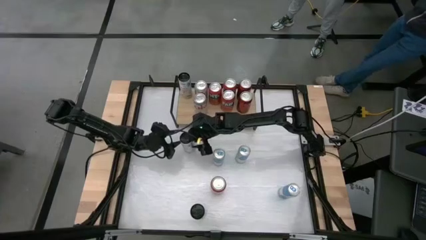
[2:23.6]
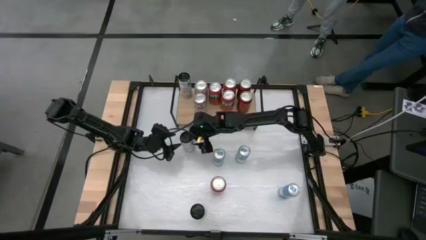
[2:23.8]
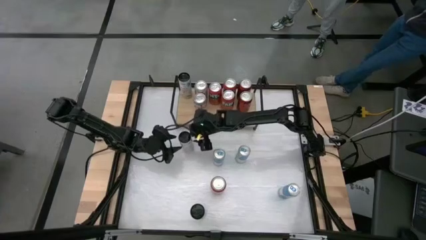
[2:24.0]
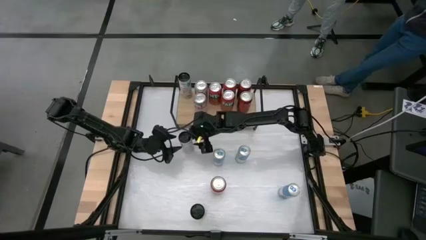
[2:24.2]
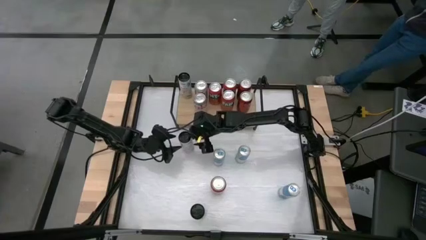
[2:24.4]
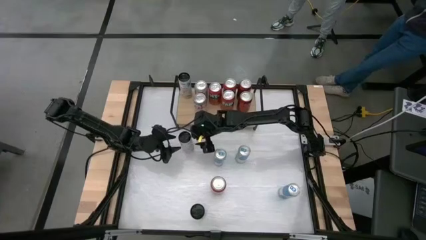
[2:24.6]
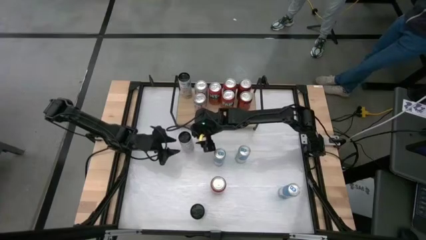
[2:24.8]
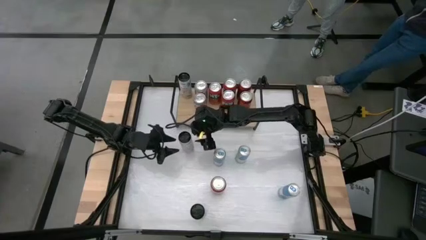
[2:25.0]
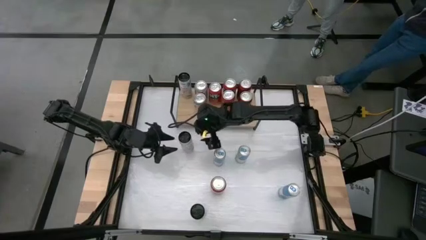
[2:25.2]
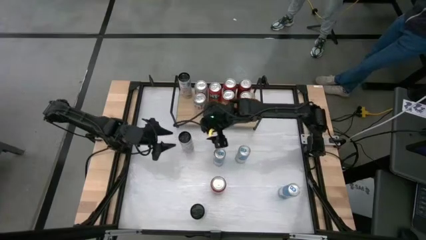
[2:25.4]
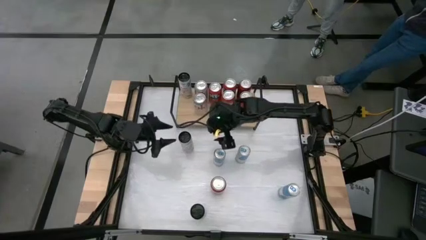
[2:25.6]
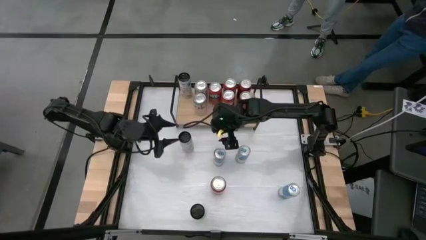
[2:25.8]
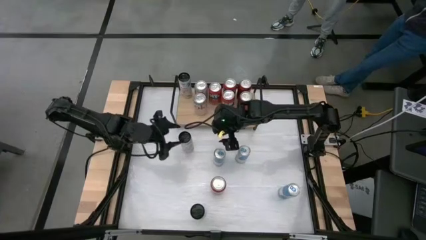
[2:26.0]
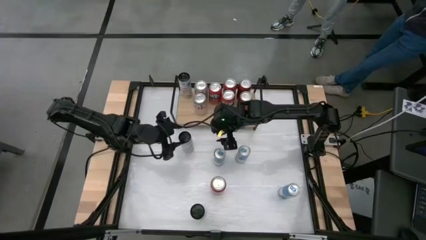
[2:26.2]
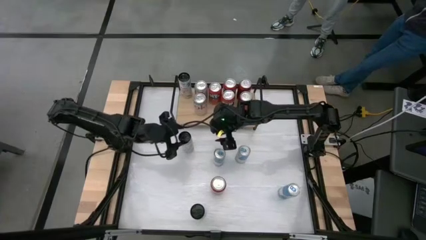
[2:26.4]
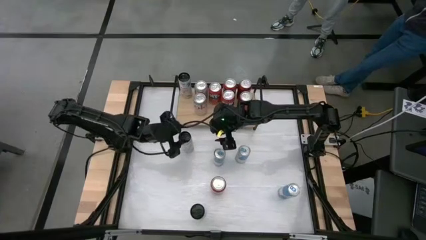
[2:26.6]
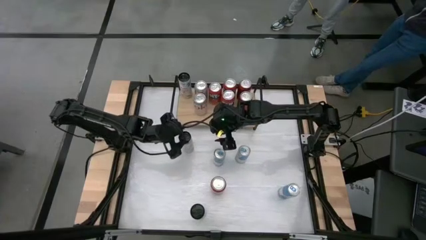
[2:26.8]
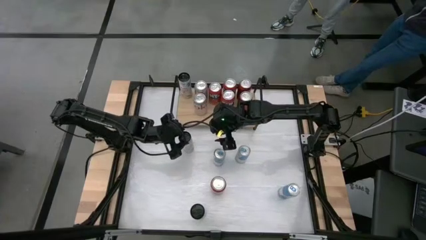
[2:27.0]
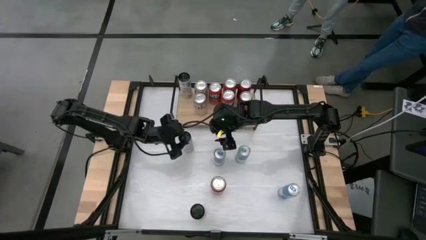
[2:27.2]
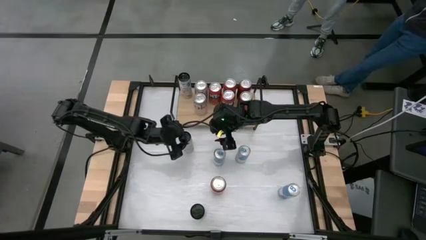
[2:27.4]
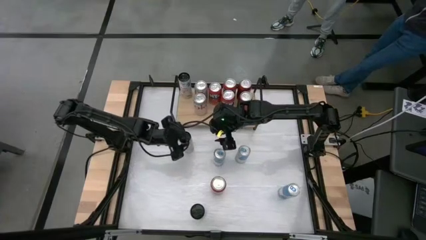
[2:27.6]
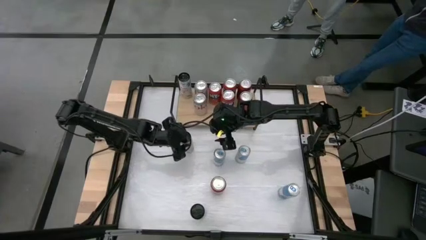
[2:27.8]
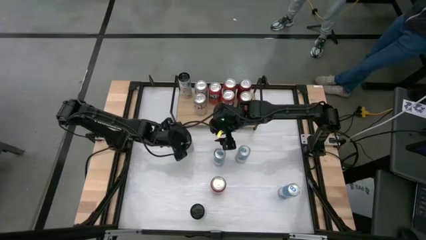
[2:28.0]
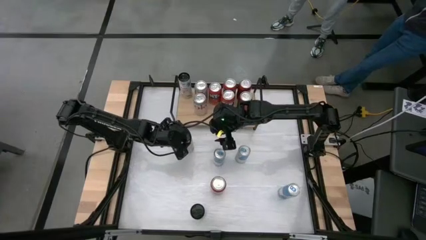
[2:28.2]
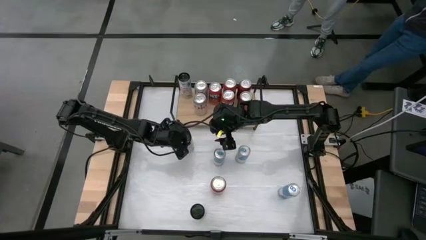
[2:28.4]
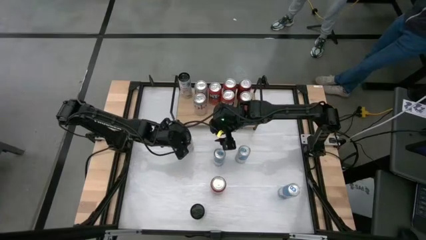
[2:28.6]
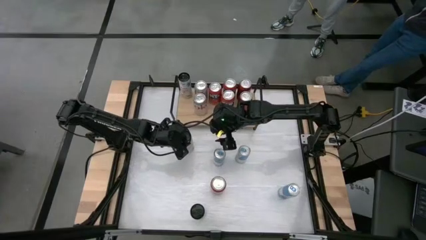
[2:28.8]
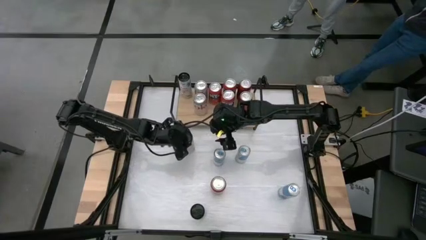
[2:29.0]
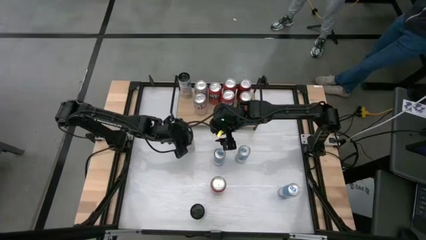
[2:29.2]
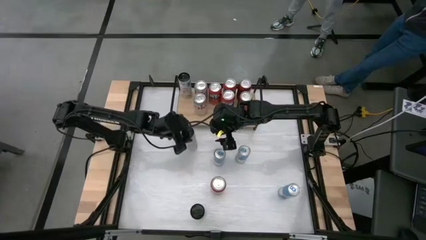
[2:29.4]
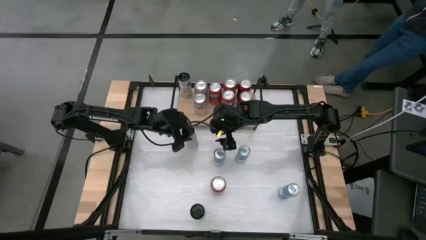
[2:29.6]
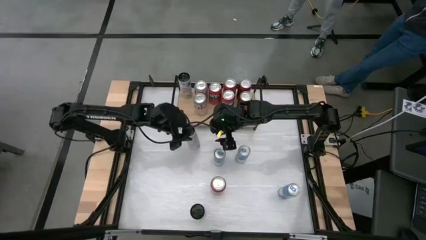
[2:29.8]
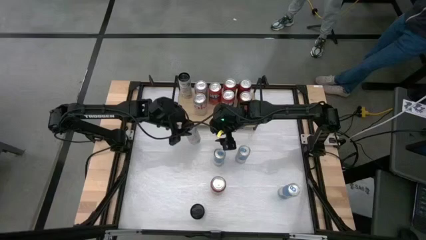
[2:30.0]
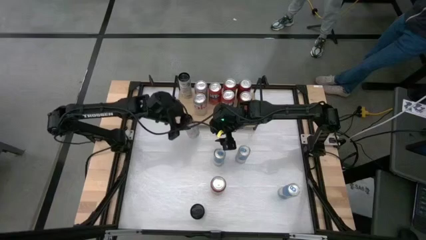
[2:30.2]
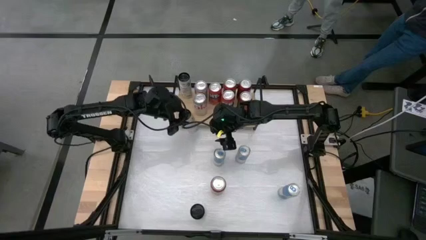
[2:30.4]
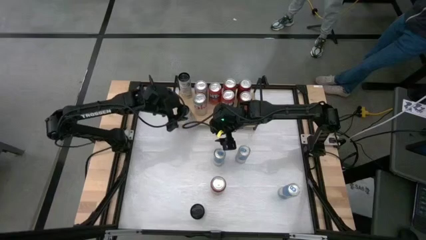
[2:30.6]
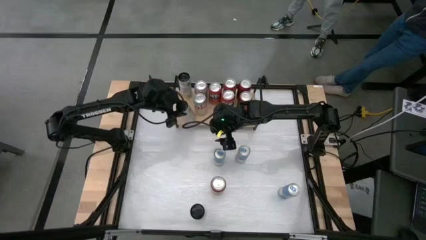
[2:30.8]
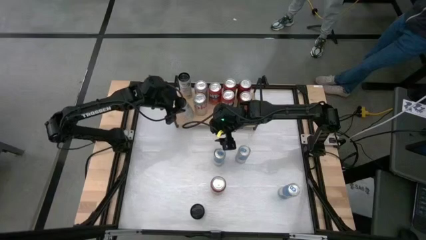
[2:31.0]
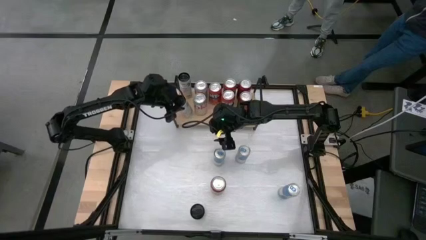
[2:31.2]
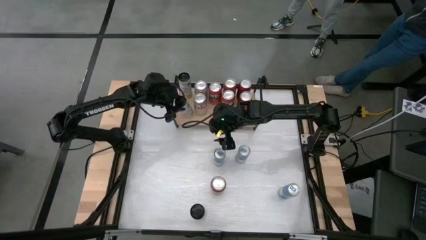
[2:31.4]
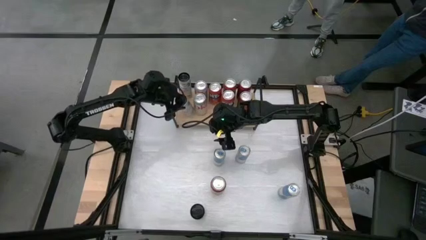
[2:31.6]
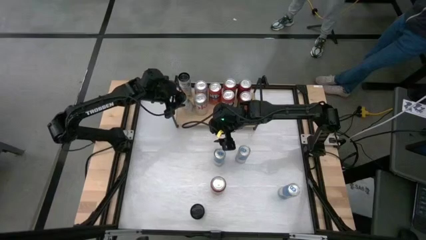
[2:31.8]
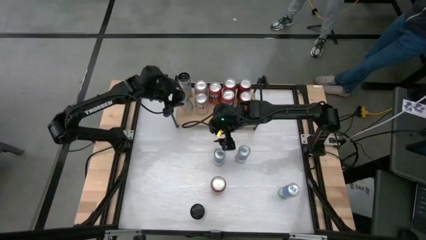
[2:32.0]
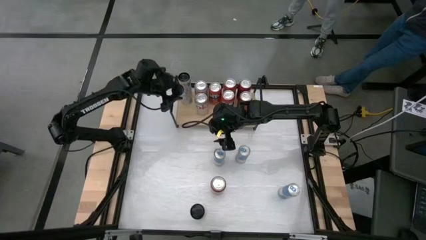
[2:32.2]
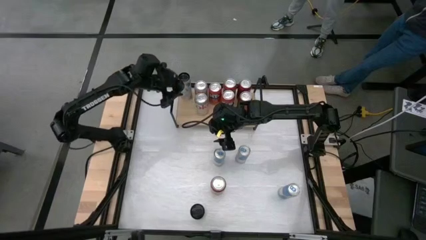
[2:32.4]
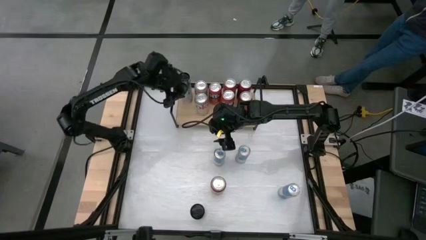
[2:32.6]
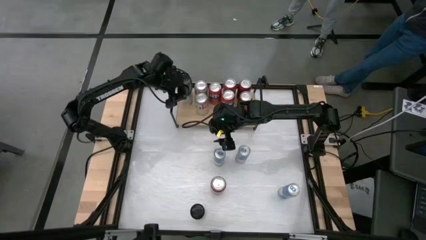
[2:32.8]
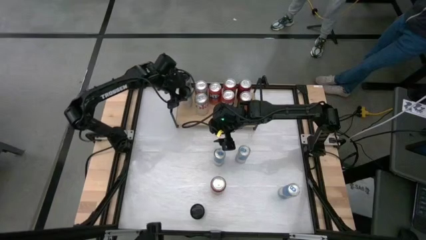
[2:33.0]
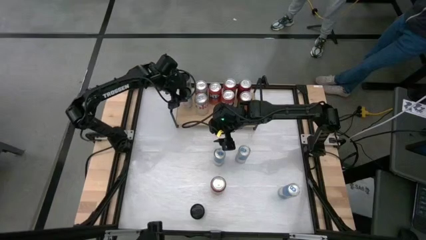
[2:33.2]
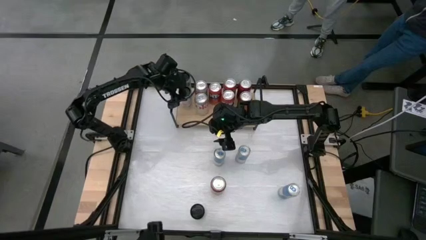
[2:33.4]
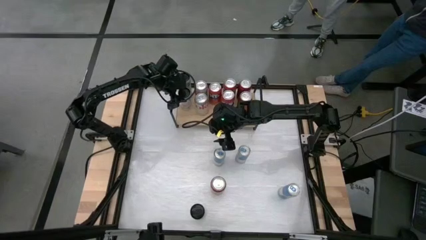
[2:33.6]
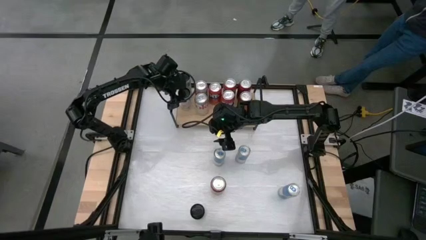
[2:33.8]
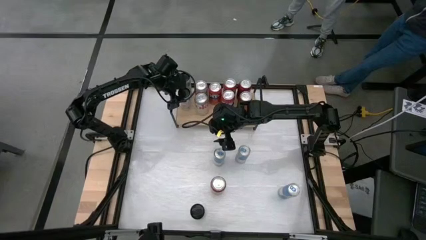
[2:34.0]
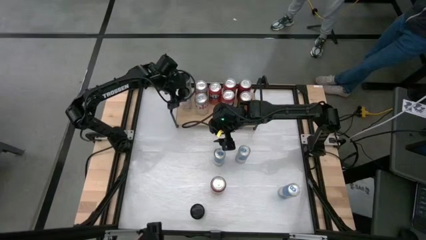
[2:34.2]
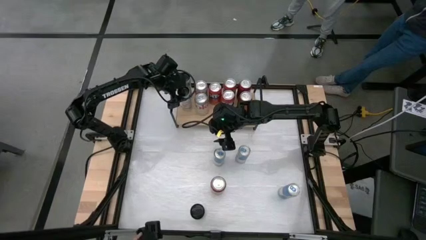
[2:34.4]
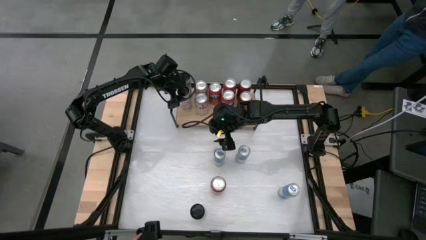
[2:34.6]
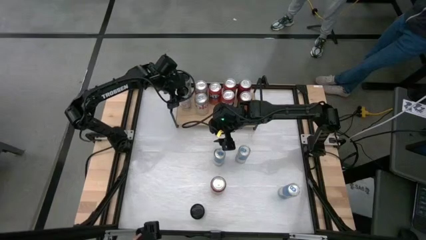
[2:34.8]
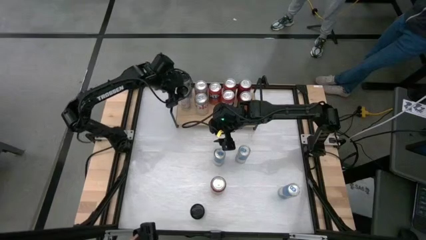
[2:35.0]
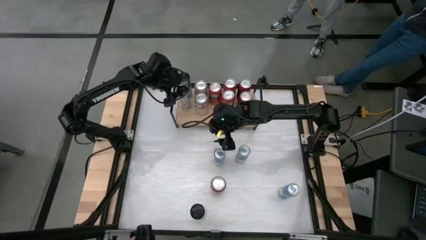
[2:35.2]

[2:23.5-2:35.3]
Task: Place canned beverage on shelf
Put the white and pink soda can on the shelf aligned with other white and pink soda can
